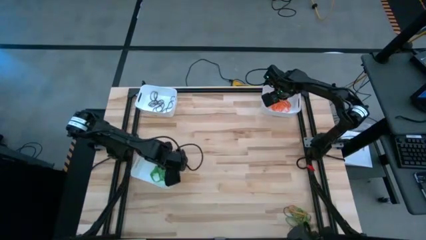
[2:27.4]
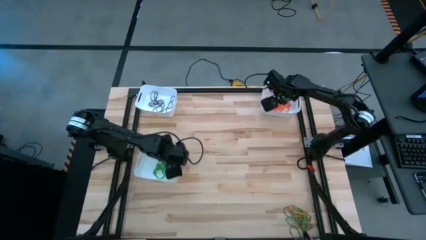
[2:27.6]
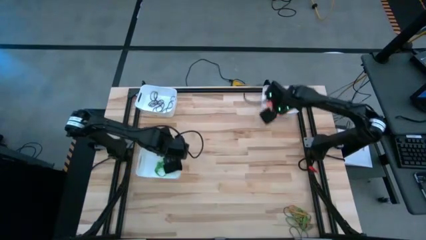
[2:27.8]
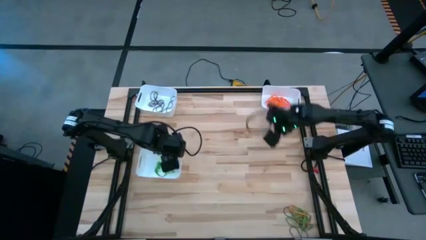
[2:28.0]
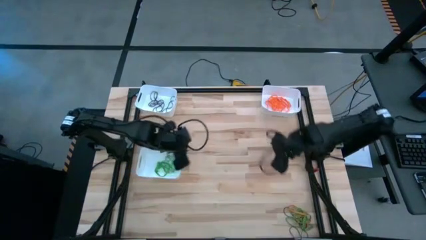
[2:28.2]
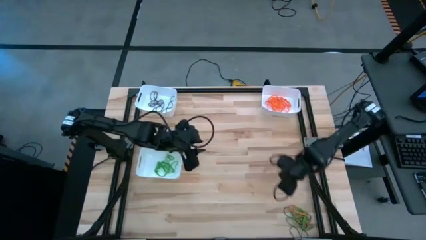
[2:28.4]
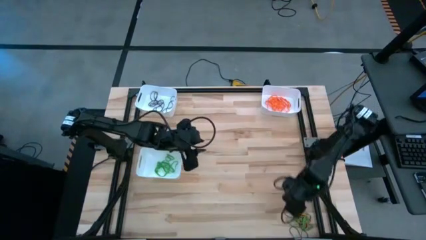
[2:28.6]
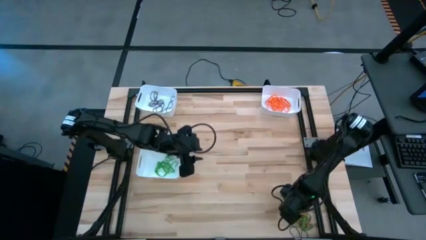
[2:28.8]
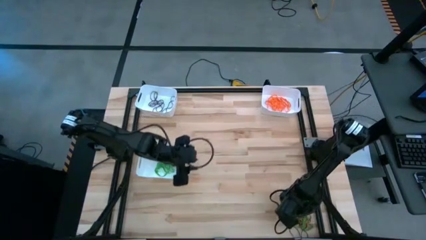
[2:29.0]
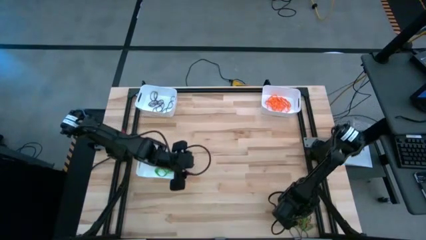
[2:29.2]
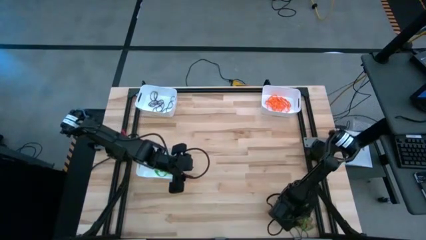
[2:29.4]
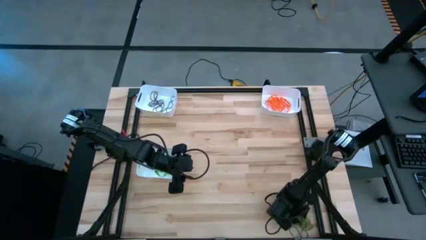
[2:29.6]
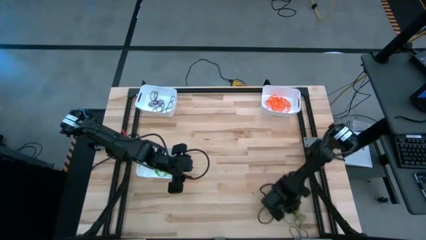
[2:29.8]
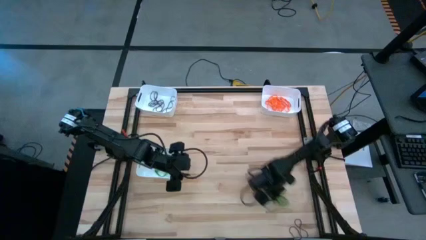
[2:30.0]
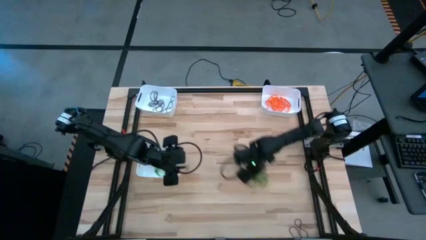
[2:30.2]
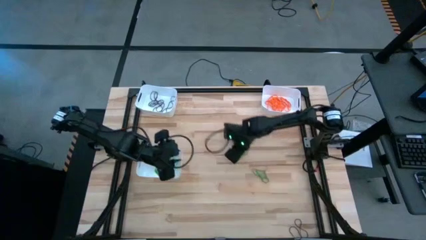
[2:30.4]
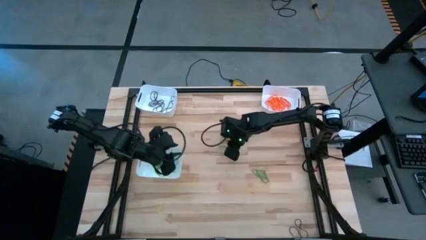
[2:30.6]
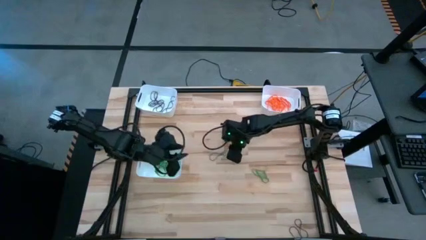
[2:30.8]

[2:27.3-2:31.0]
Task: Sort rubber bands into baskets
Move the rubber bands to the center of the table

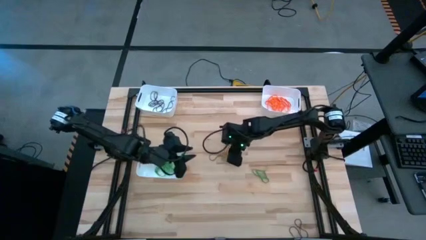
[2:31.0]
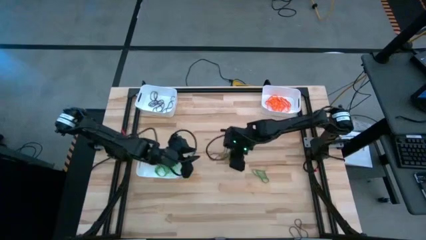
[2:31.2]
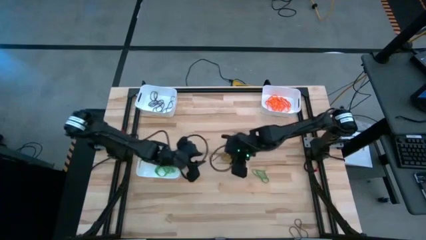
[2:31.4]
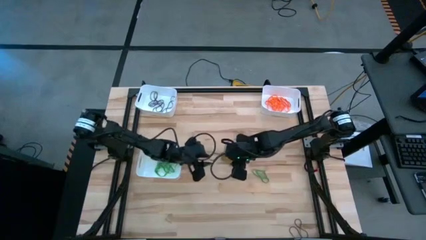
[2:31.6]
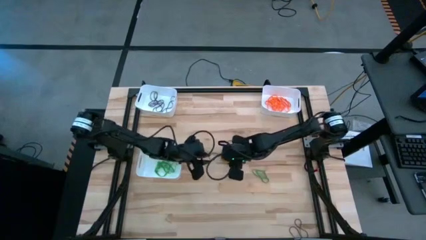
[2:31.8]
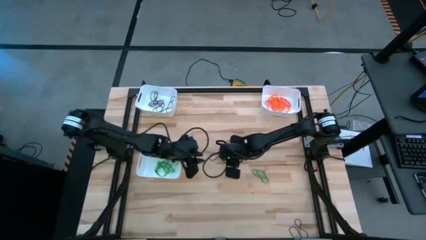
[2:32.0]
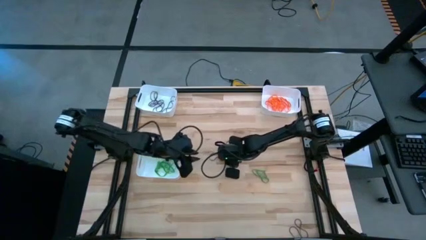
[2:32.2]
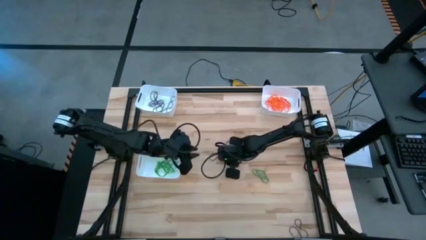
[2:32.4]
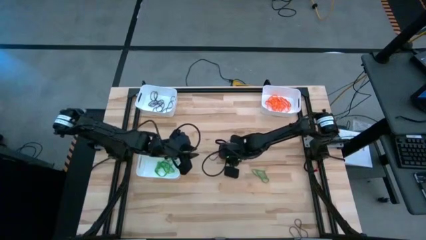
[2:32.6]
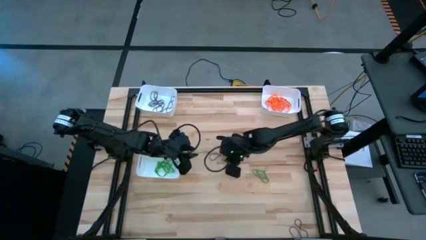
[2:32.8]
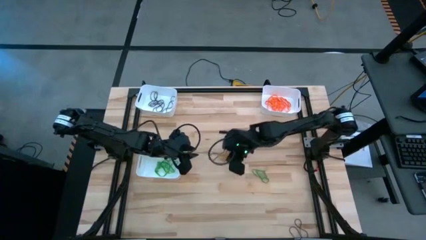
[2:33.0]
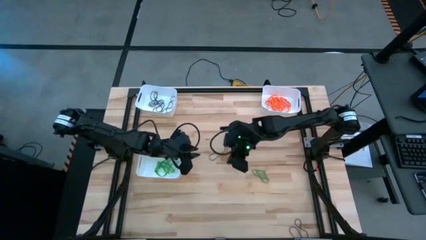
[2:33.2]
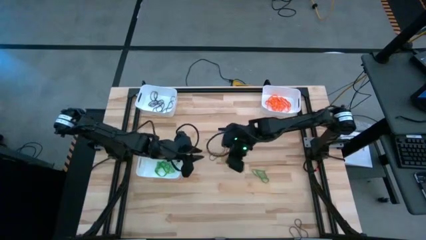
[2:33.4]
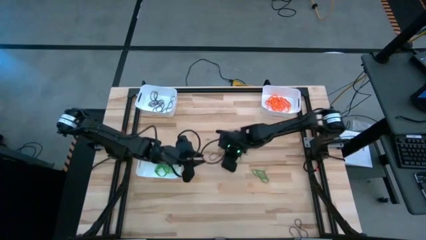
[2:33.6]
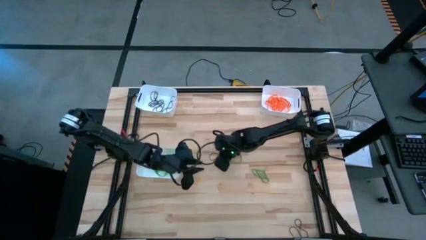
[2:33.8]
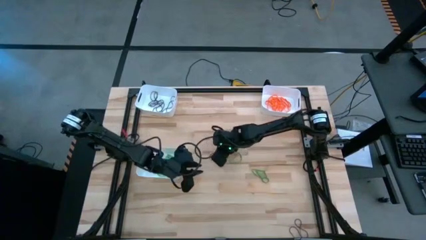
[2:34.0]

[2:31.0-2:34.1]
Put the orange rubber band into the top right white bin

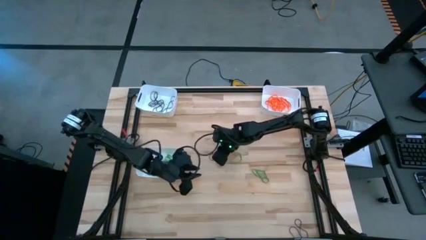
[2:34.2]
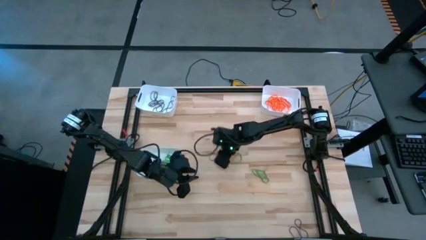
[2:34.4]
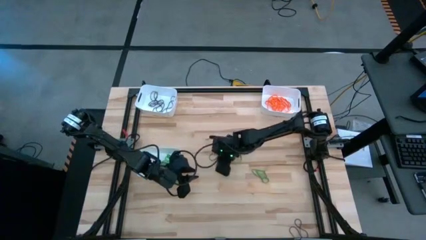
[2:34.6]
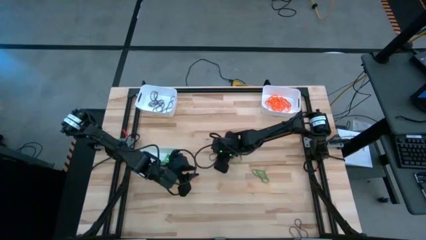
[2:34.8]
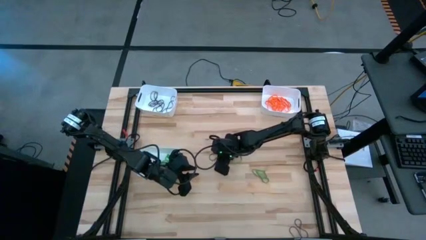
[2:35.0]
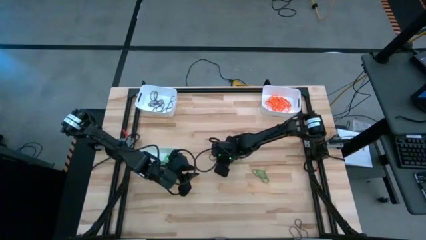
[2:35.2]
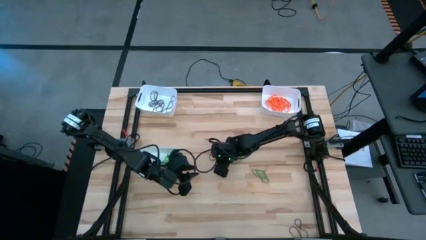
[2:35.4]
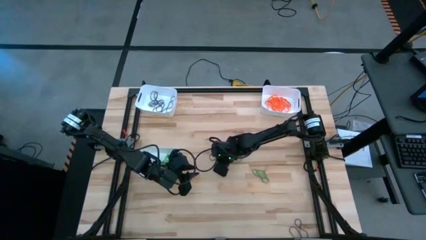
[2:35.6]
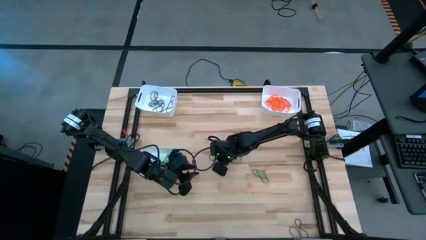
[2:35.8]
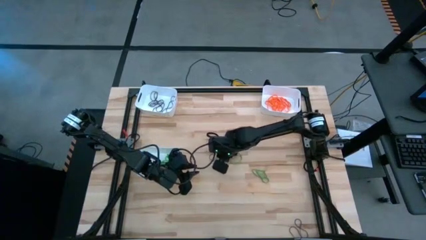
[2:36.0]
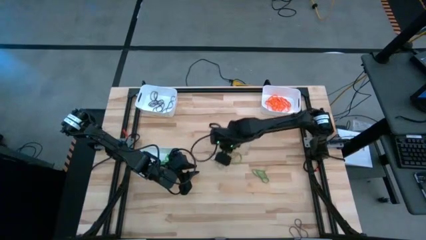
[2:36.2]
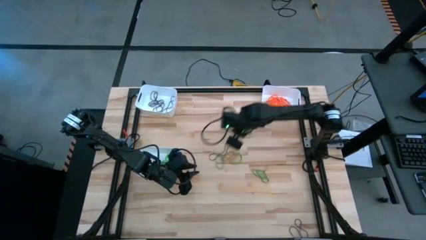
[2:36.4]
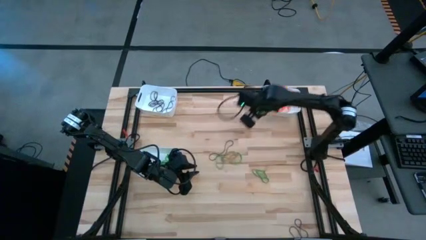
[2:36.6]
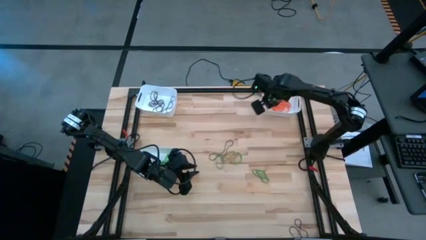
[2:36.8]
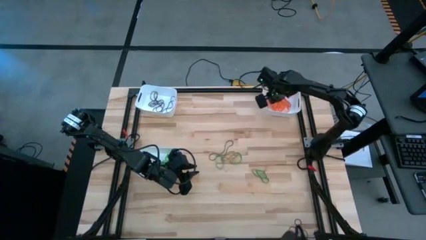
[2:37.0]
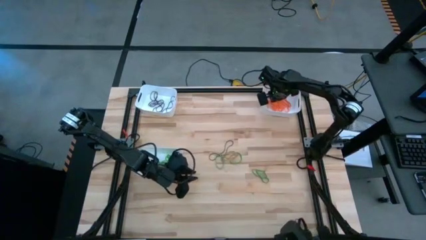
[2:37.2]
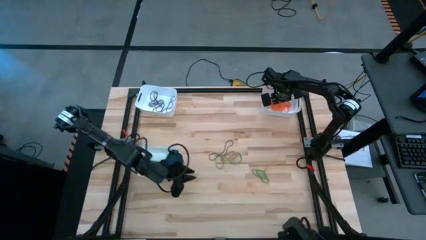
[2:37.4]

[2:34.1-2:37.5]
Put the orange rubber band into the top right white bin

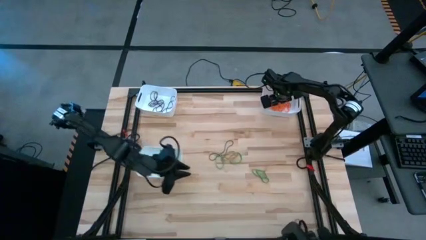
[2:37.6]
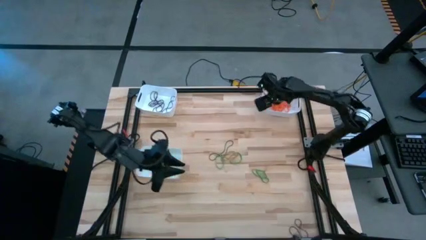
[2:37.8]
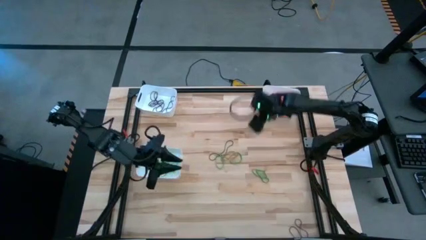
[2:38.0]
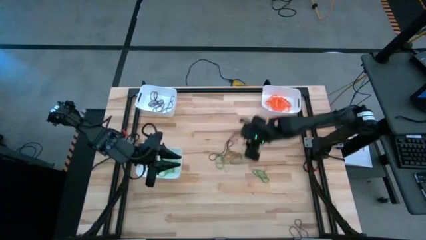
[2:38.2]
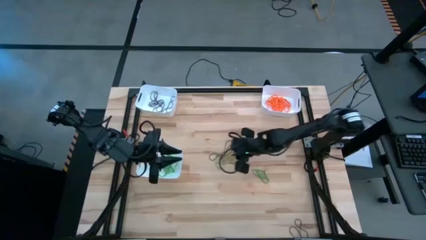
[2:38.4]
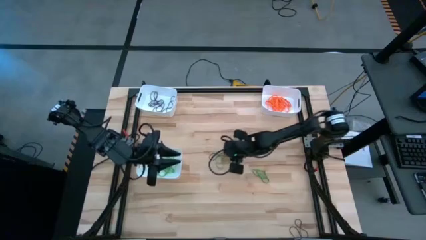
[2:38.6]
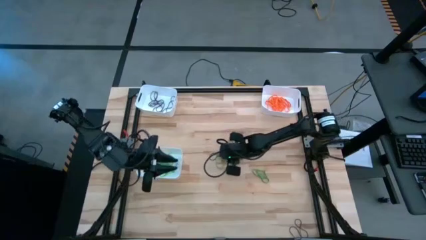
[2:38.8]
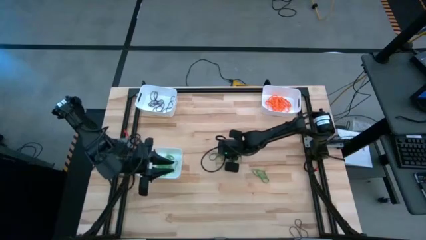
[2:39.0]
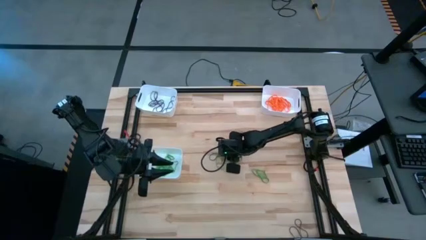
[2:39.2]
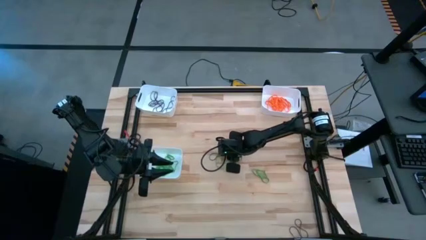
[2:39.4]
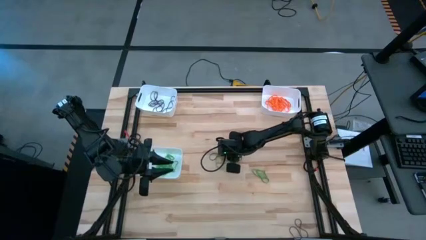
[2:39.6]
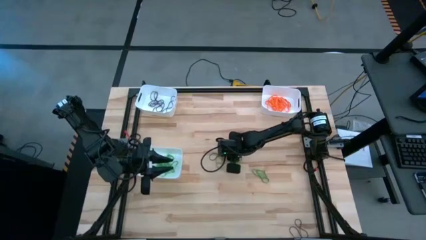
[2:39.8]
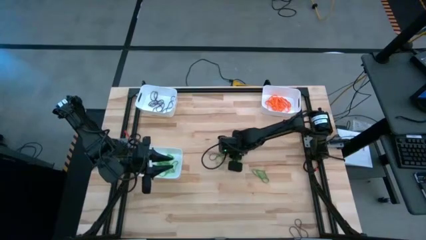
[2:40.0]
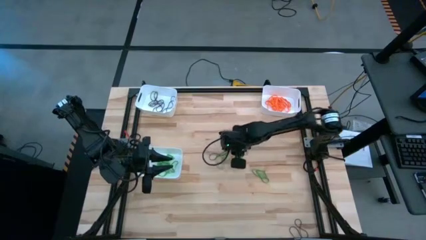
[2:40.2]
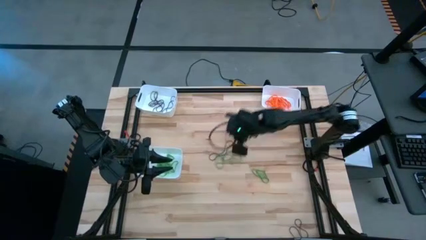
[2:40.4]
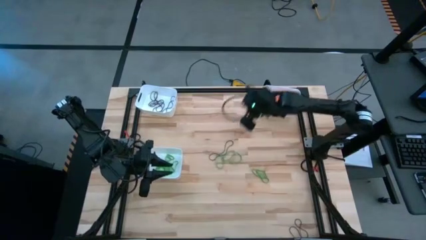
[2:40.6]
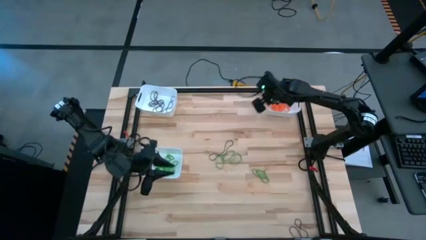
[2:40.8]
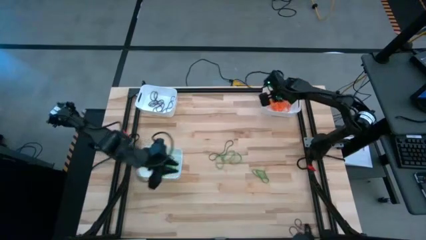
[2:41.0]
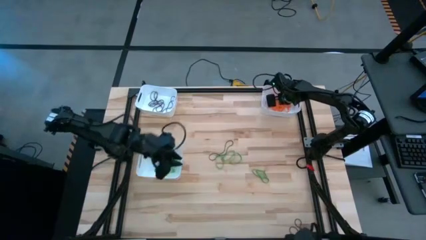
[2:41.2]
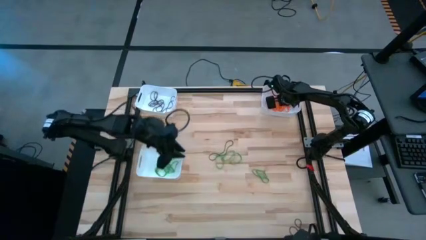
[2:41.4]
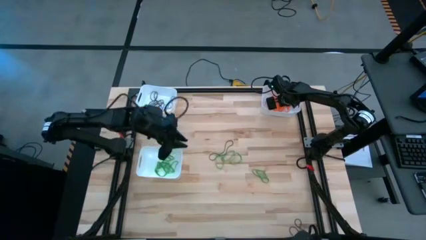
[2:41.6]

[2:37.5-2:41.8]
Put the orange rubber band into the top right white bin
